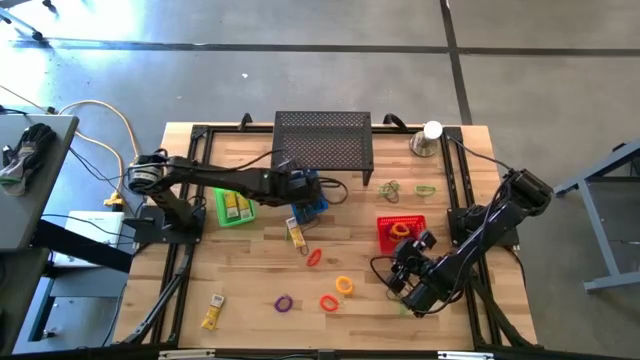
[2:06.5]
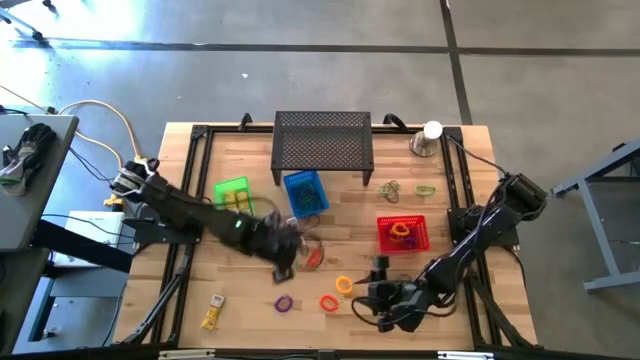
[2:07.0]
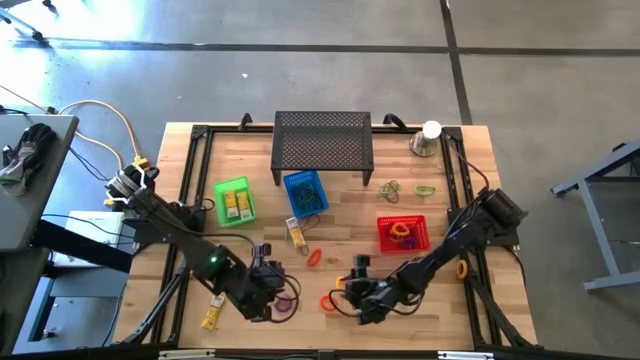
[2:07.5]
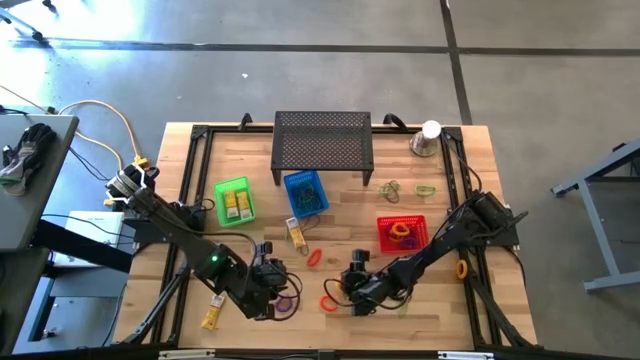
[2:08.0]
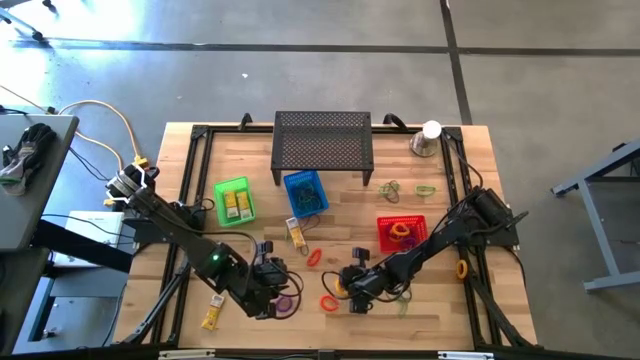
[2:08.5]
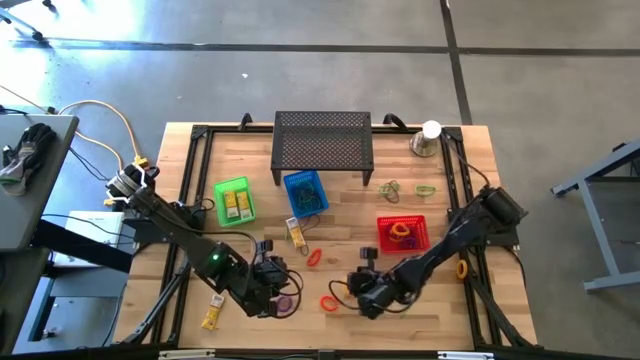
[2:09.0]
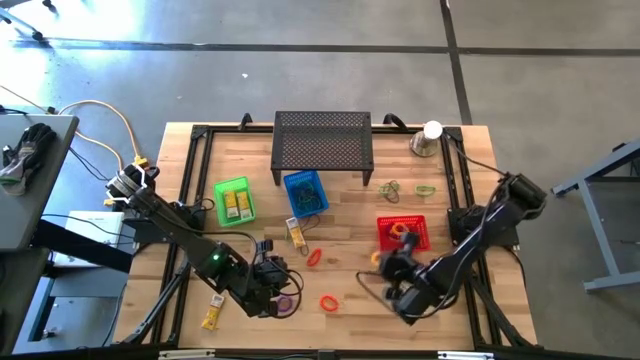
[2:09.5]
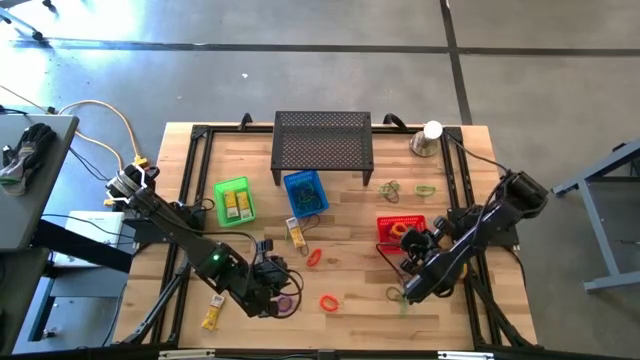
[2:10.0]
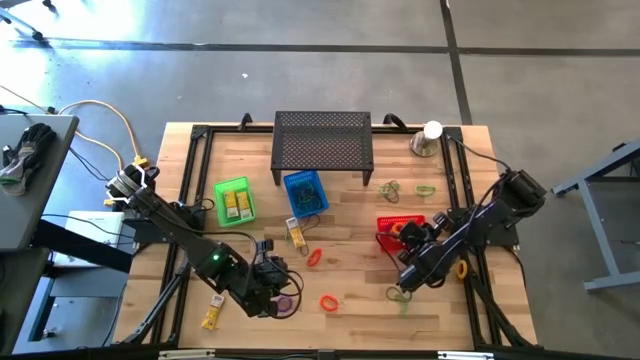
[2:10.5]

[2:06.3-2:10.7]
Task: Pick & Place Office Desk Supplies
Put the orange spring keychain into the red basket

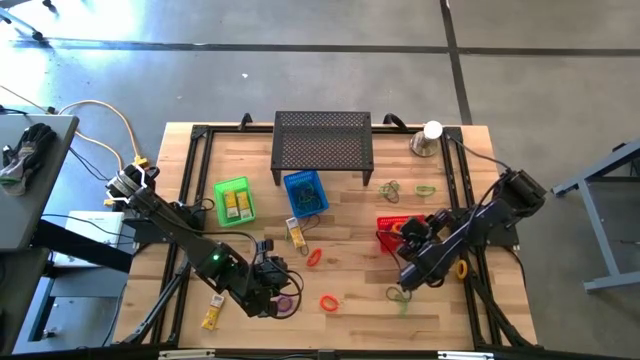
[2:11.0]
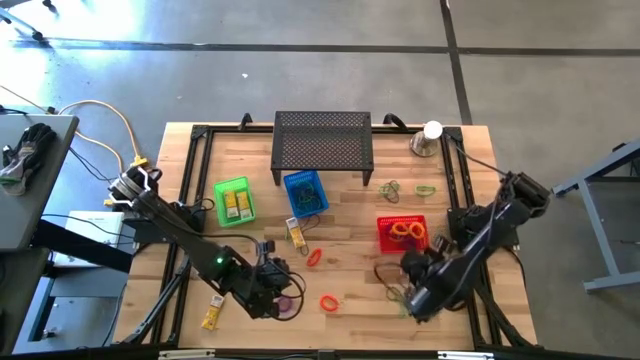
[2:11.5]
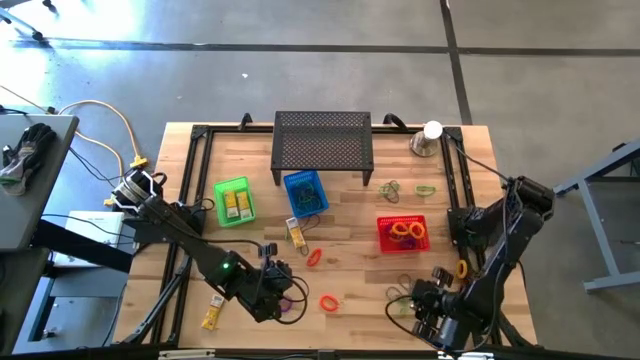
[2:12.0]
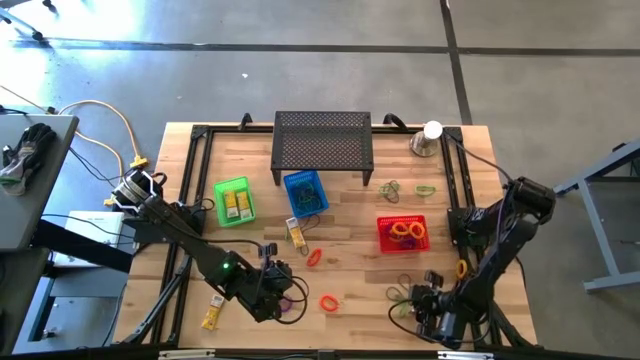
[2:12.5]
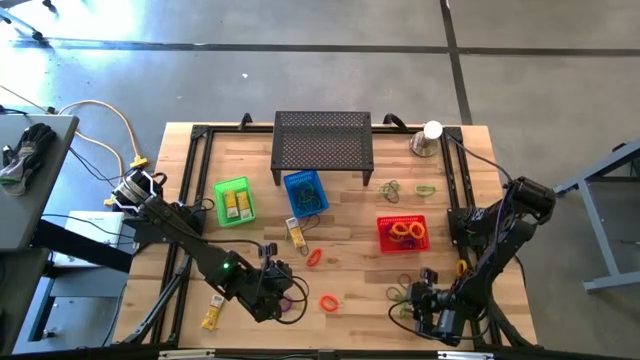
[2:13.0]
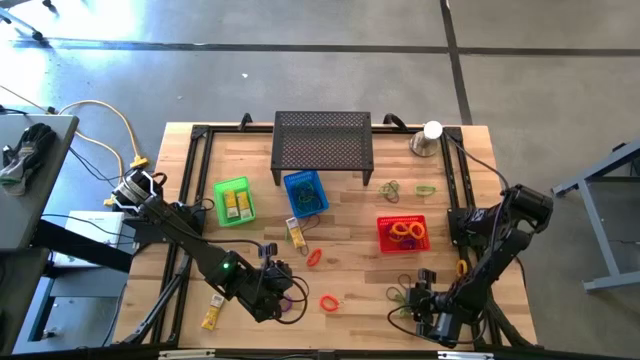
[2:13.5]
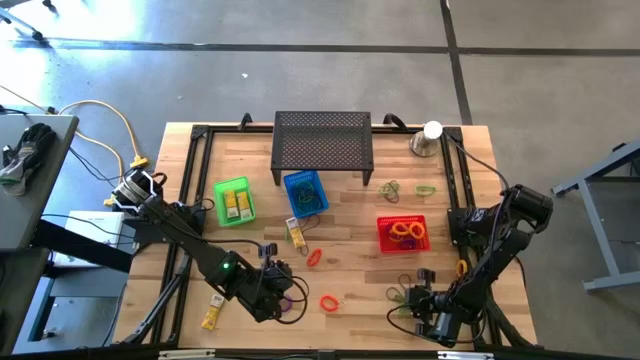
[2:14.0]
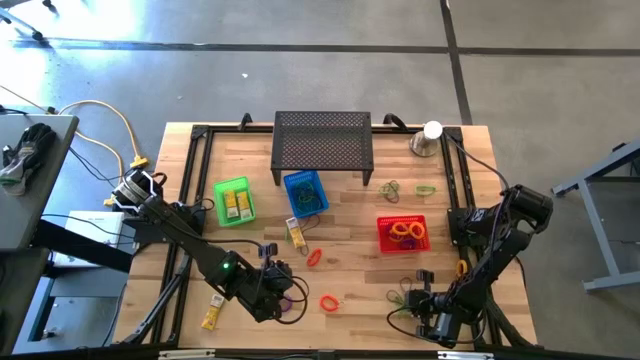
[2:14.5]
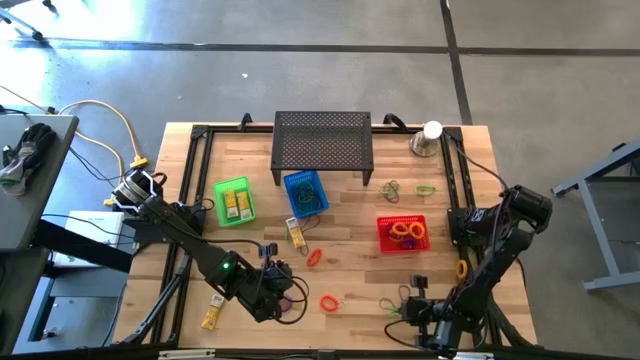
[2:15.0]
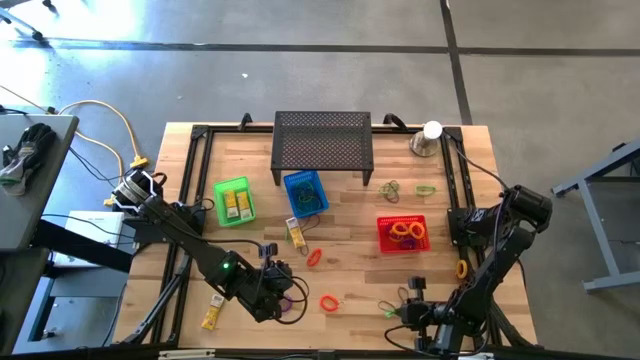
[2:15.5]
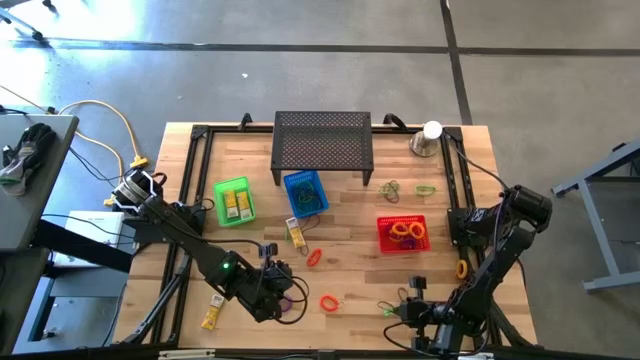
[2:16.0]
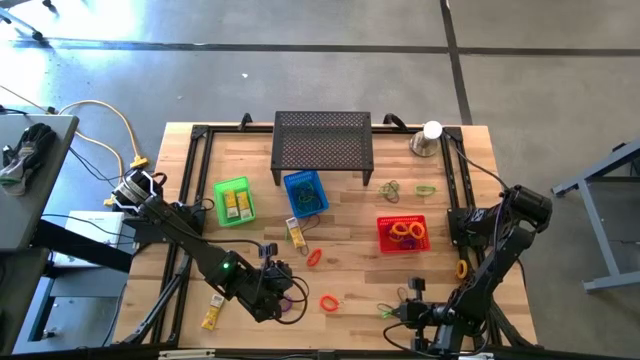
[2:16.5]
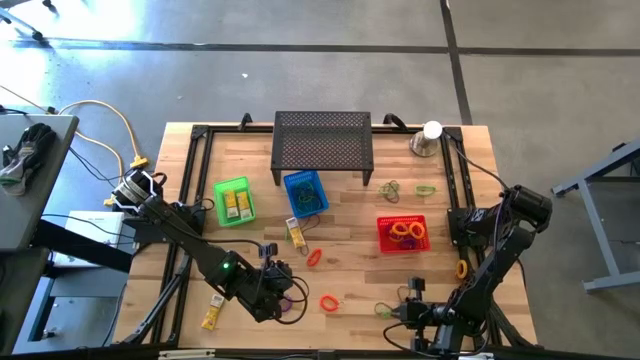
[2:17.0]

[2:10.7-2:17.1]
Put the green rubber band into the blue basket

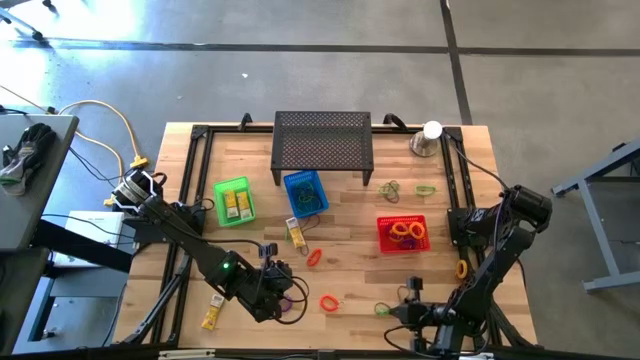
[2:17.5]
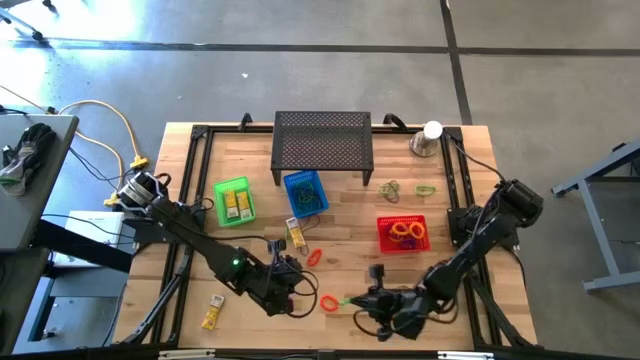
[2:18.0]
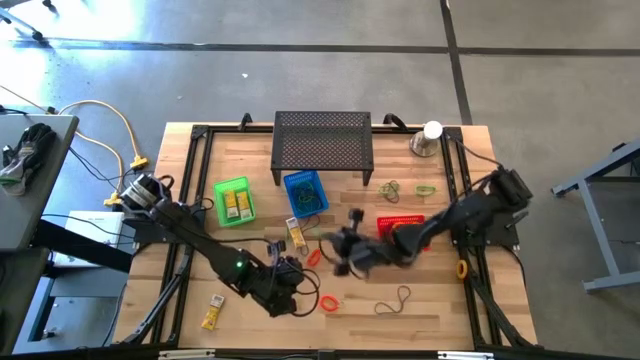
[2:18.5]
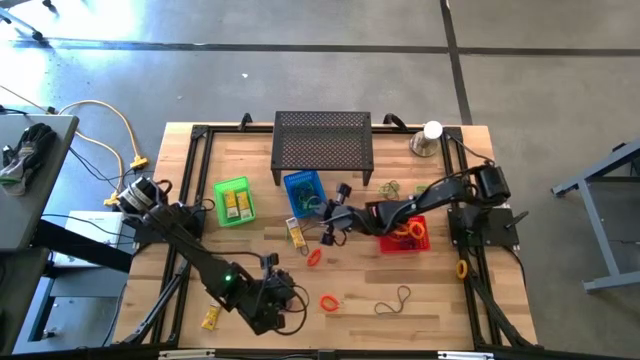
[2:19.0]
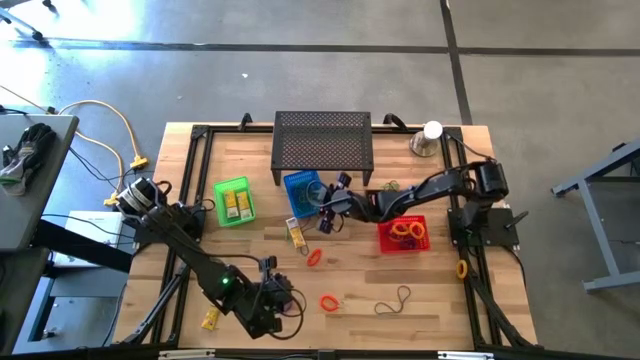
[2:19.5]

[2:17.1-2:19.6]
Put the green rubber band into the blue basket

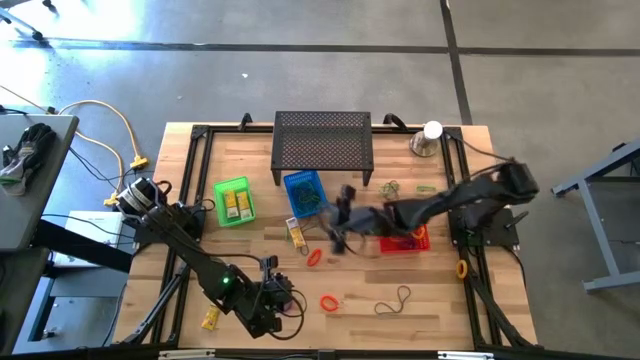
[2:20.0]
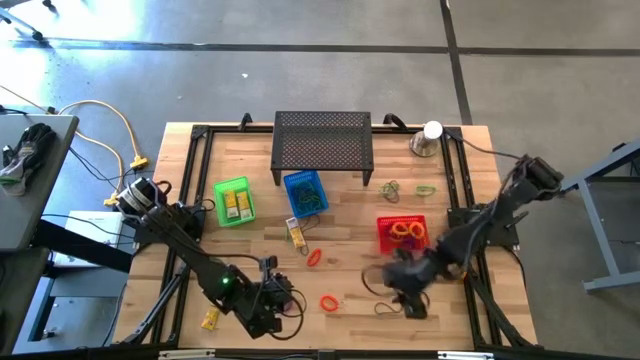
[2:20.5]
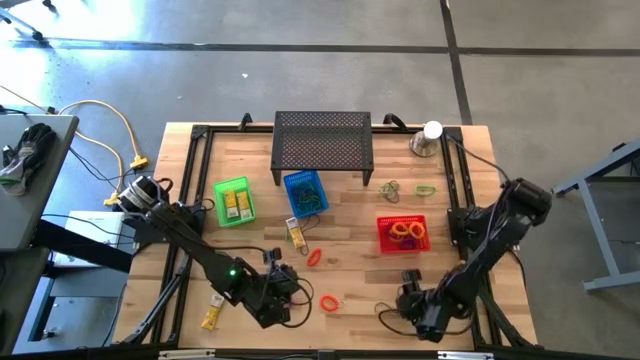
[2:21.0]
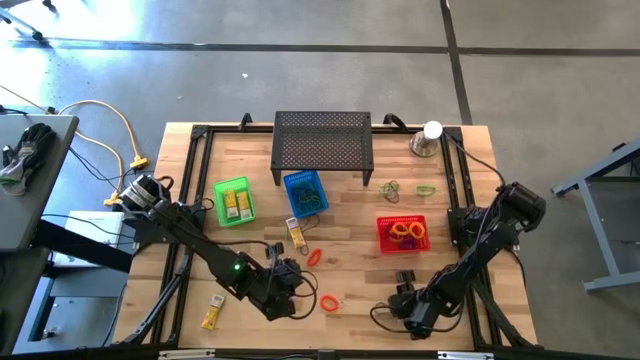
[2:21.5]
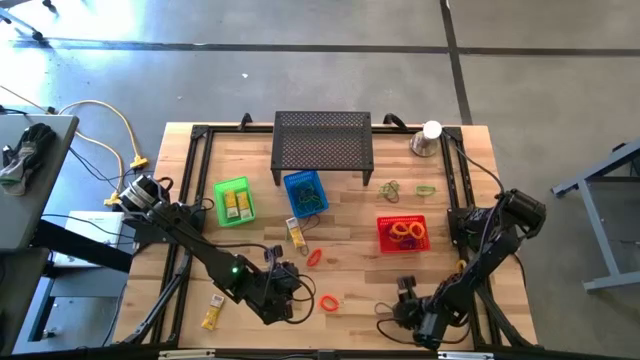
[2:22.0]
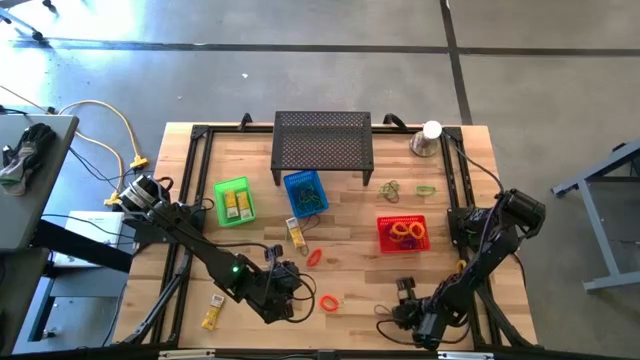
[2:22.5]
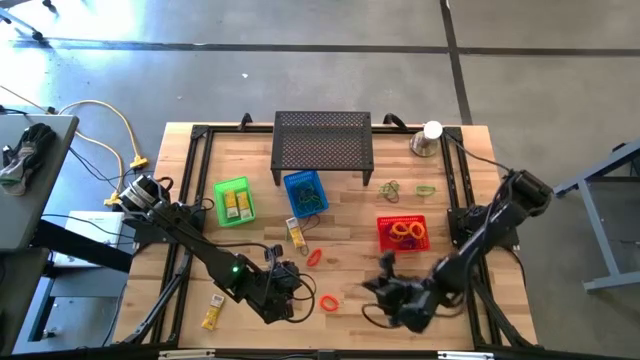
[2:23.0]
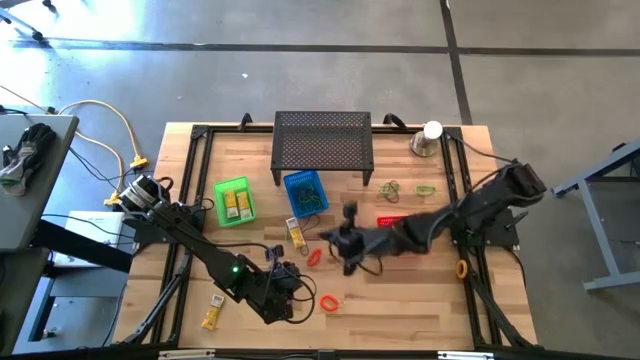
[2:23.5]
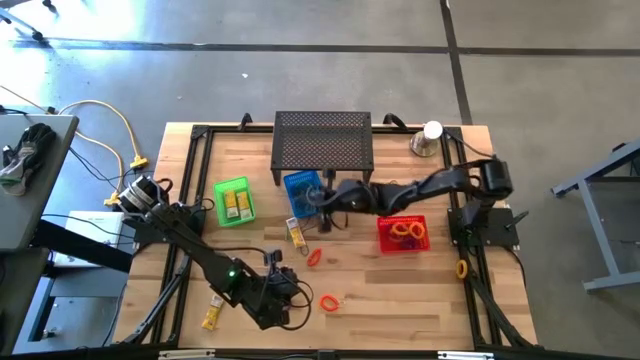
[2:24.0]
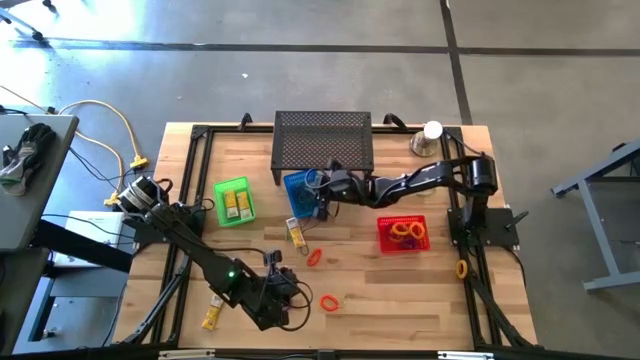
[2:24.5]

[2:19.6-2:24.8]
Put the violet rubber band into the blue basket

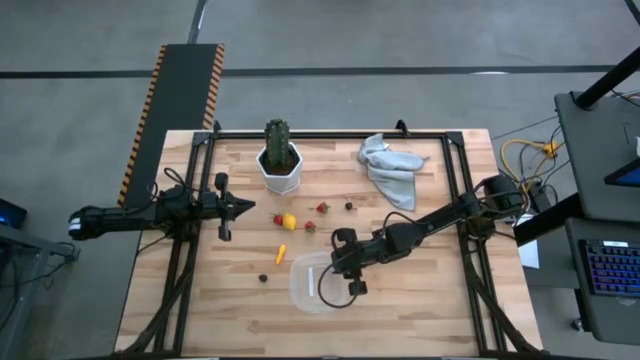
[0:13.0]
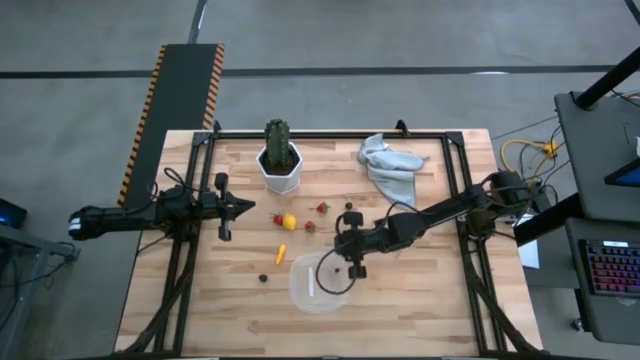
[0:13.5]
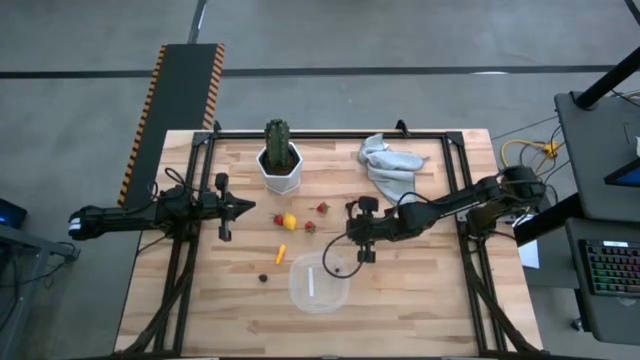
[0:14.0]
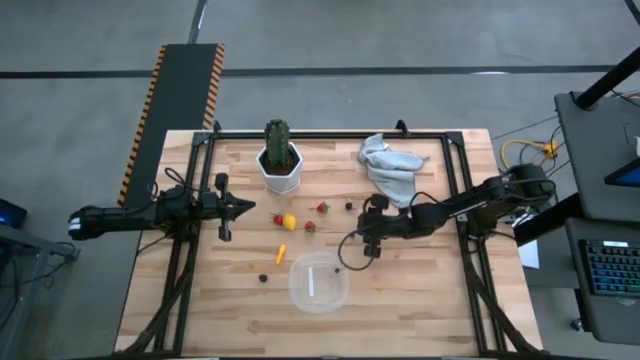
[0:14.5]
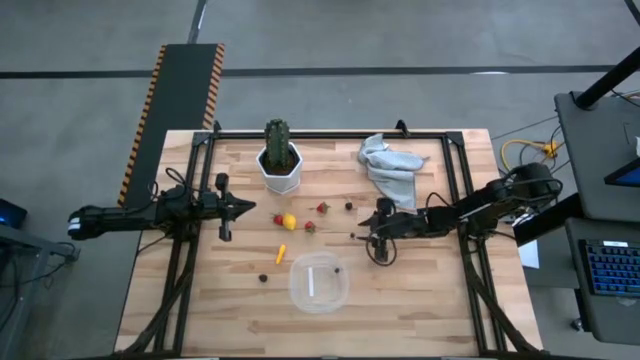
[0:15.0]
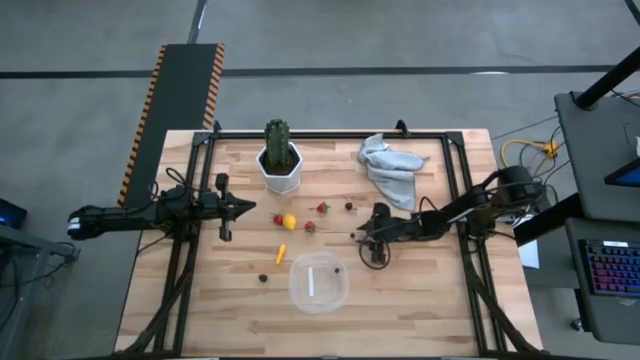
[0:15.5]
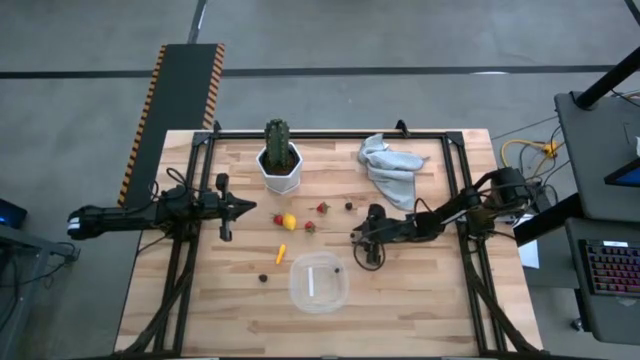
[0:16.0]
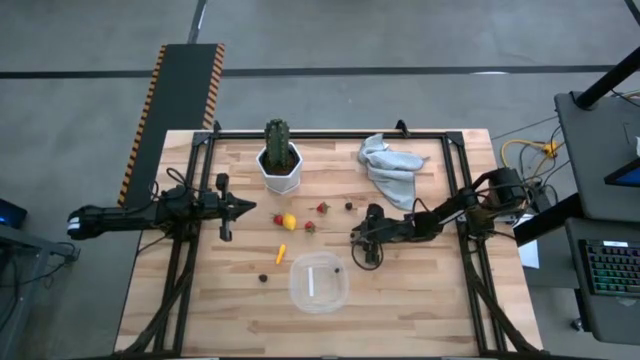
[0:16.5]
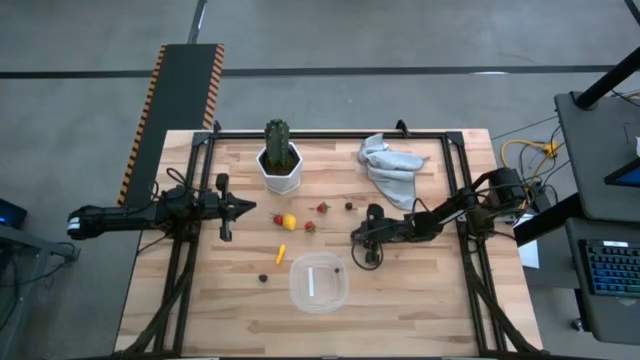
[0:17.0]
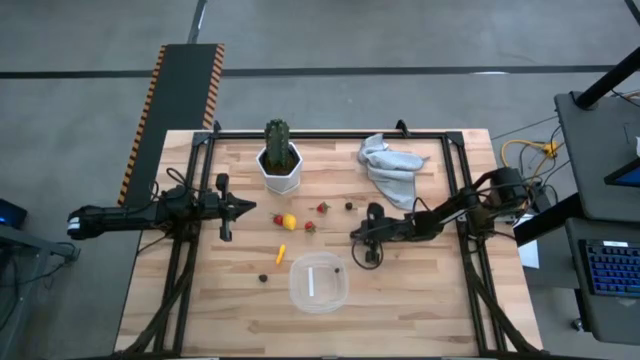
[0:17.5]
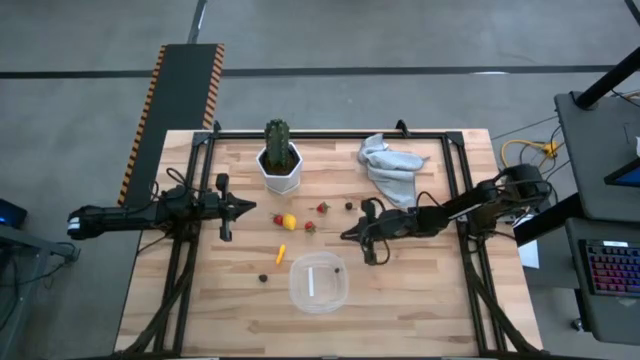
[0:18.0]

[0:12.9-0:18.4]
Task: Pick and placing Produce into tupperware
Put the blueberry into the transparent container
